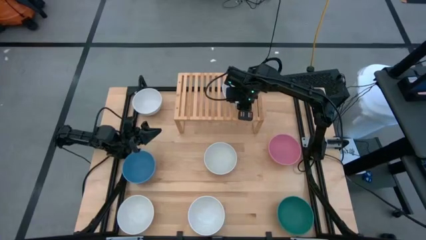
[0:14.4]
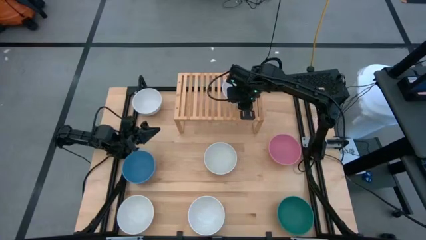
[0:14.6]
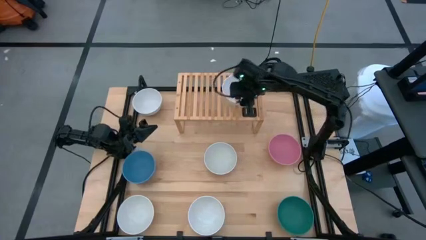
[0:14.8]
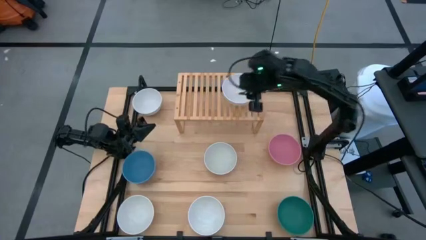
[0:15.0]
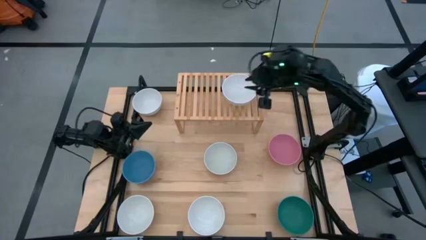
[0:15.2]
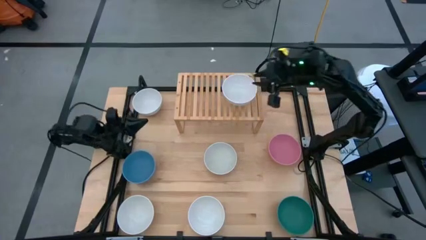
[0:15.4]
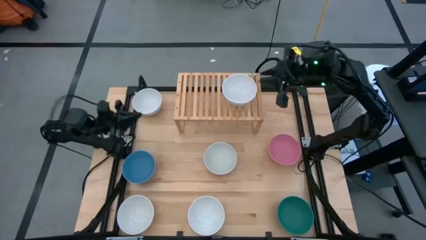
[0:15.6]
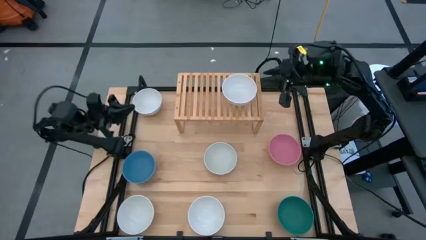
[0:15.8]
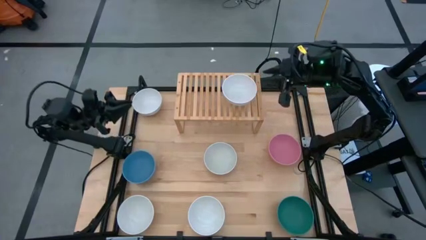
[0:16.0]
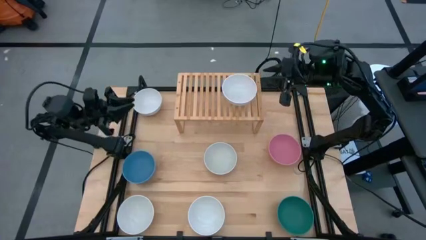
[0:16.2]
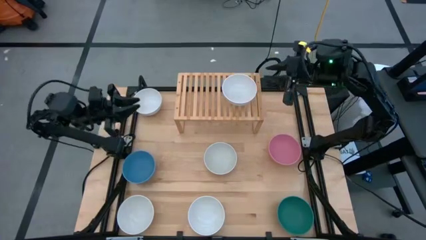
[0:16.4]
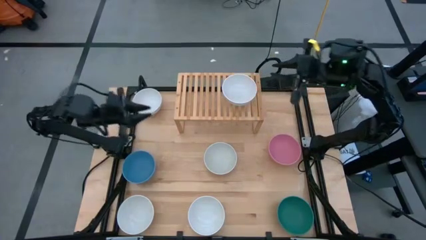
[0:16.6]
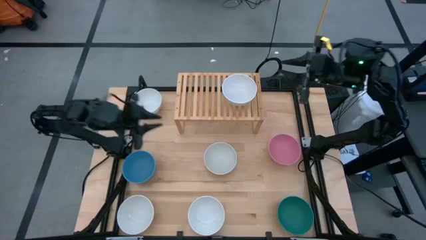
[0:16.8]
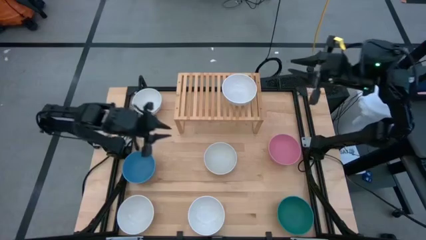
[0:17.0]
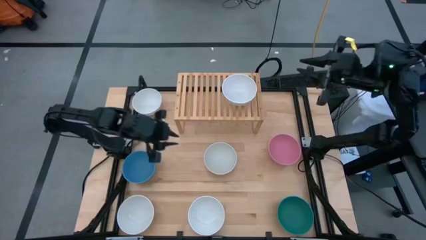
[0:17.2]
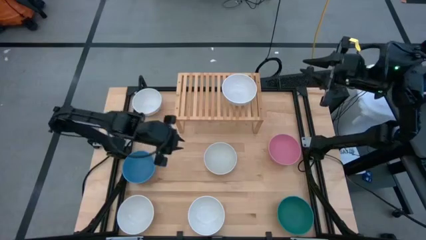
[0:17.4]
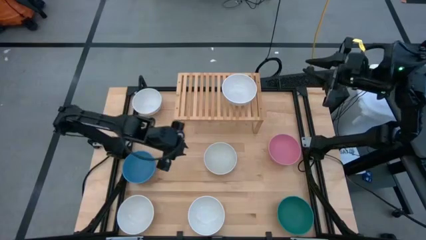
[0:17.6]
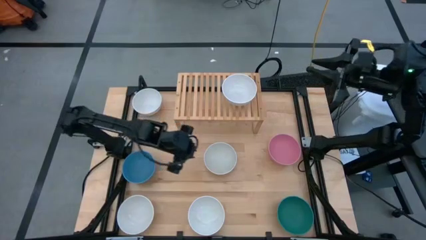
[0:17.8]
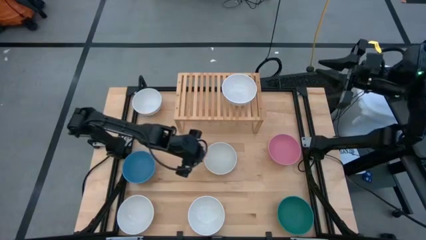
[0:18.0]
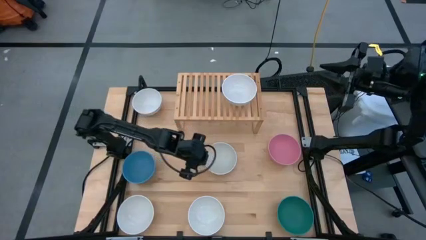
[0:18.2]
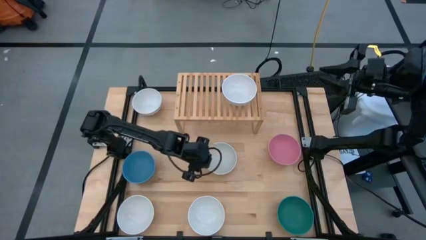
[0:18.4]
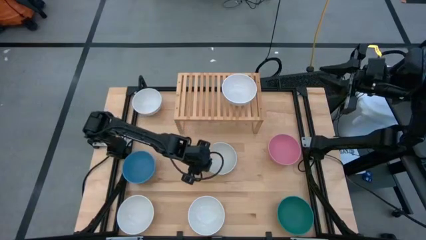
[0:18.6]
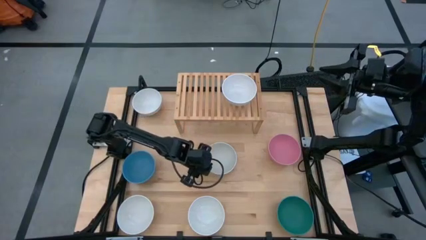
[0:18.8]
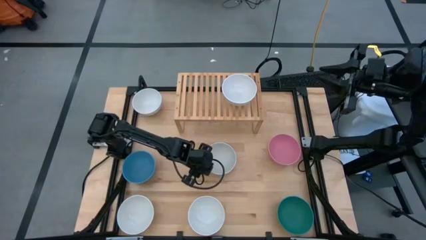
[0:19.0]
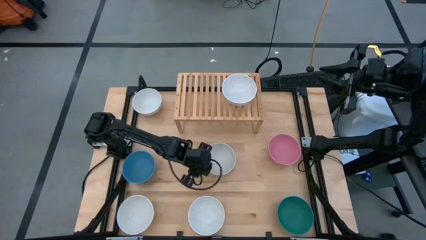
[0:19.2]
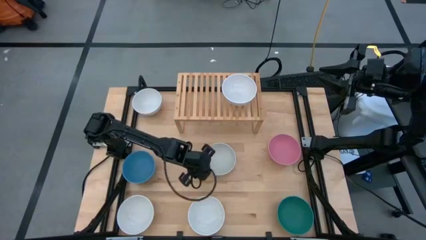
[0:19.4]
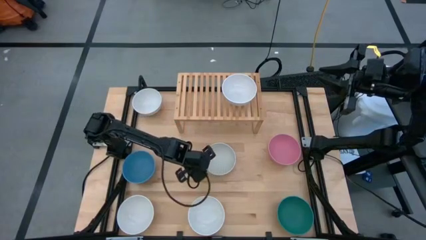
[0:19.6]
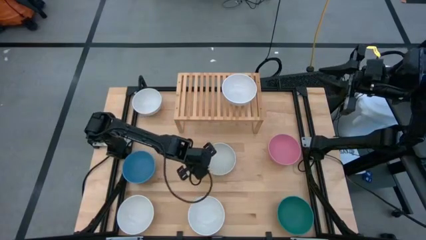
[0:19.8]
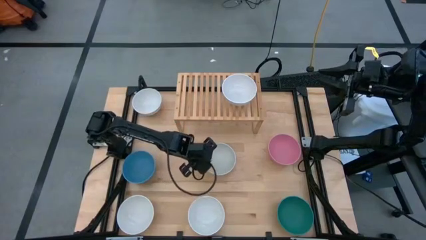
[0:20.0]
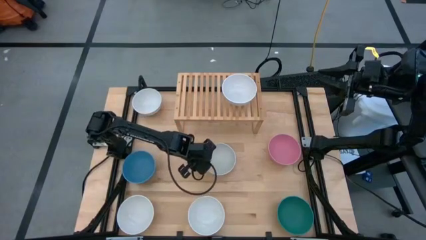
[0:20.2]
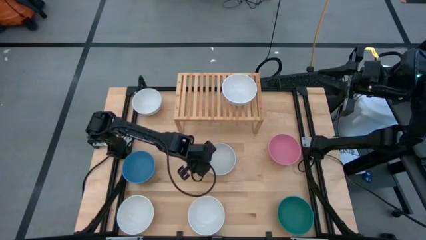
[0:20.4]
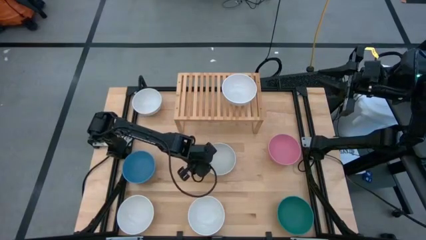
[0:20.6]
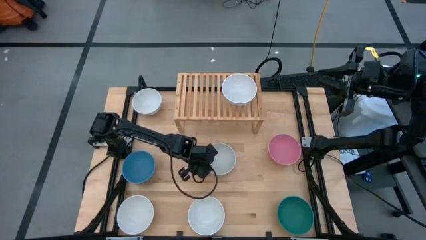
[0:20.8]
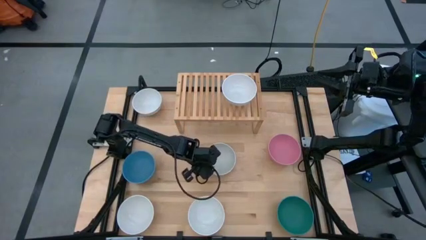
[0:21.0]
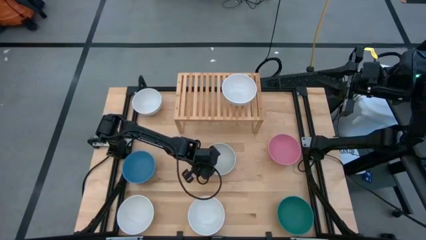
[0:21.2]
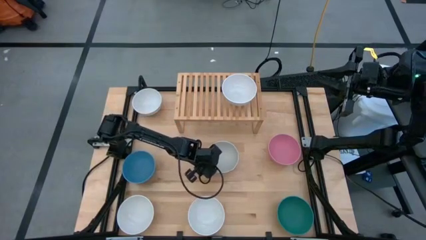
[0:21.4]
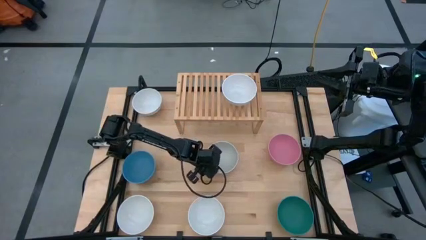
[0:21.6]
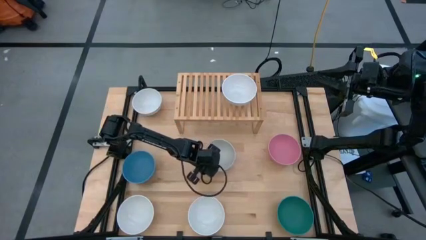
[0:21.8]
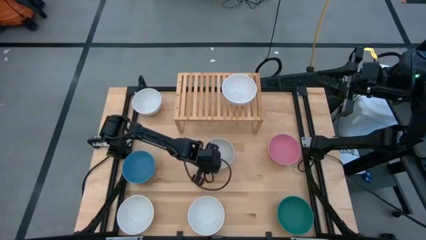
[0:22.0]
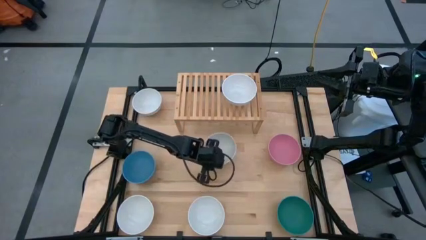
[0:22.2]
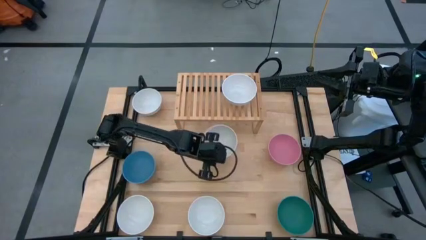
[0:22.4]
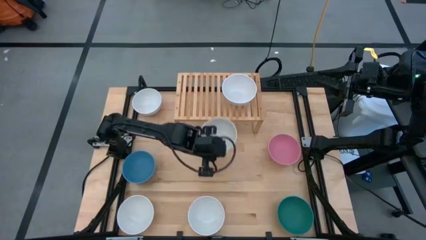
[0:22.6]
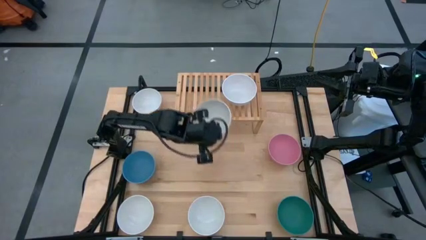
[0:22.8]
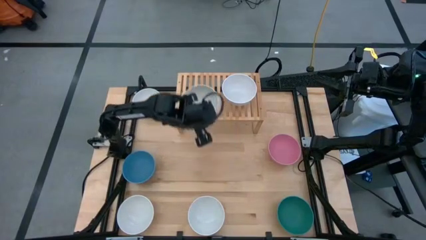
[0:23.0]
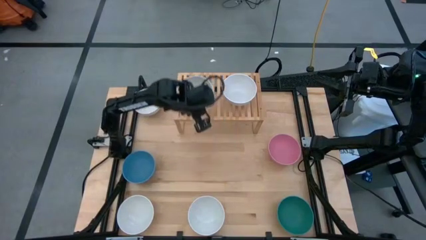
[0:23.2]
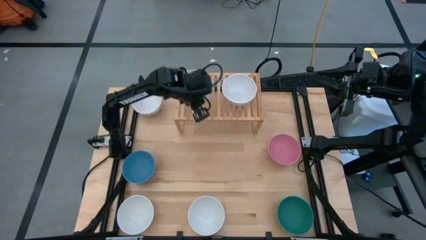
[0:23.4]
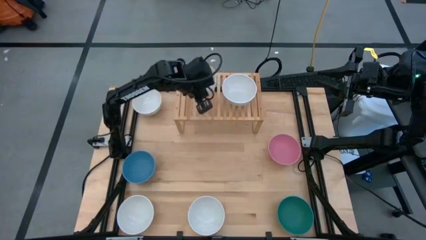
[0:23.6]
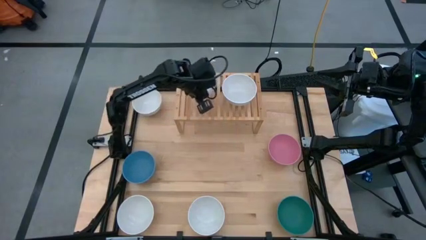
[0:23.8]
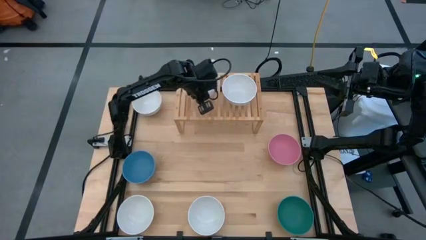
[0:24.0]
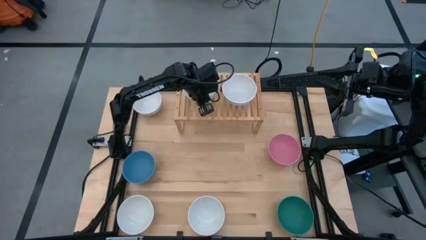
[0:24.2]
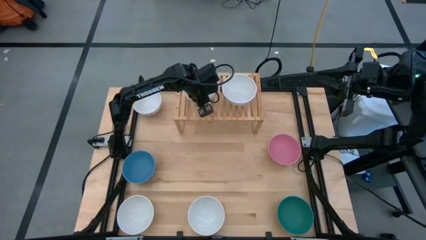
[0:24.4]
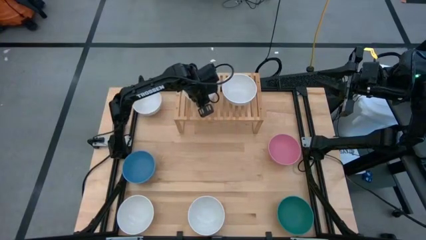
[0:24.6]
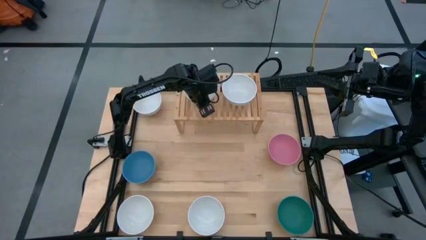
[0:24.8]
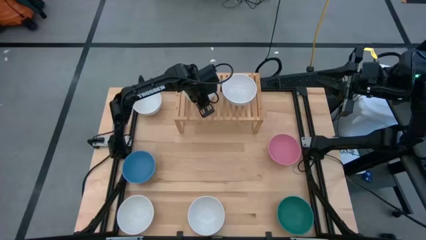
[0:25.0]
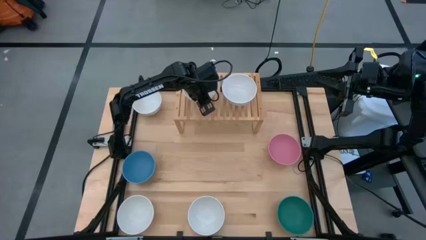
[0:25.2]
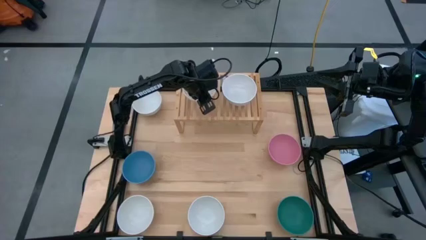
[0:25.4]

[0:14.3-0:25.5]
Task: Place and stack bowls onto a shelf
Put the white bowl on the shelf

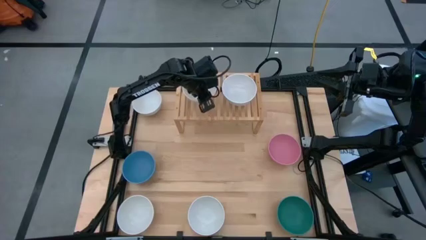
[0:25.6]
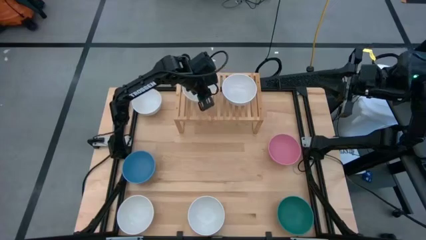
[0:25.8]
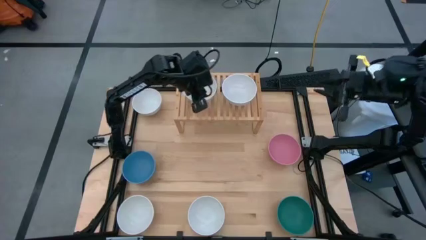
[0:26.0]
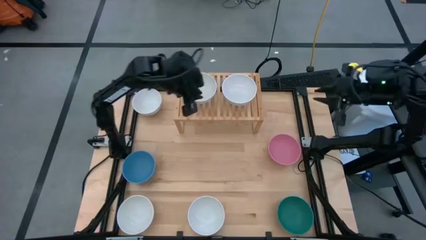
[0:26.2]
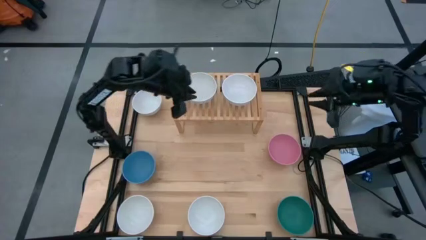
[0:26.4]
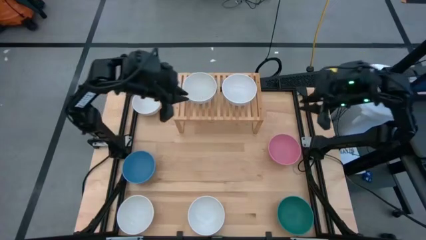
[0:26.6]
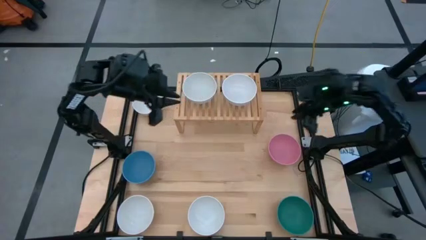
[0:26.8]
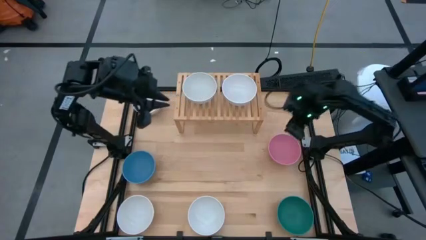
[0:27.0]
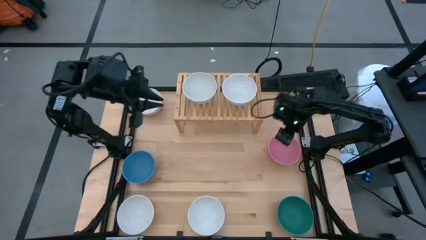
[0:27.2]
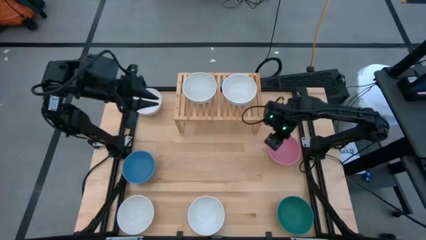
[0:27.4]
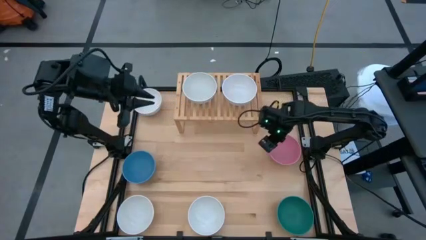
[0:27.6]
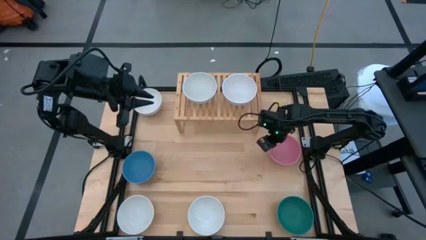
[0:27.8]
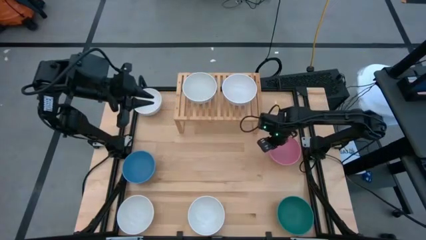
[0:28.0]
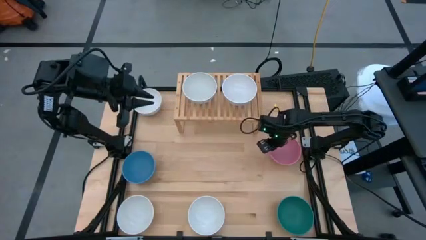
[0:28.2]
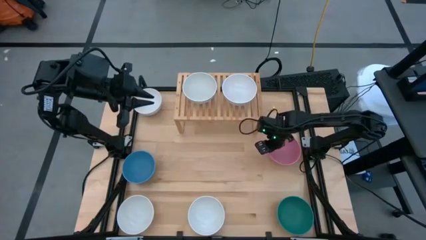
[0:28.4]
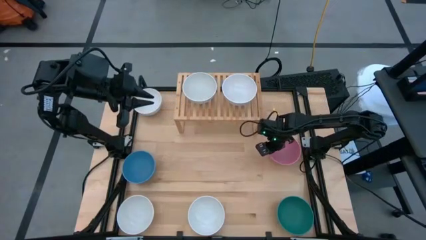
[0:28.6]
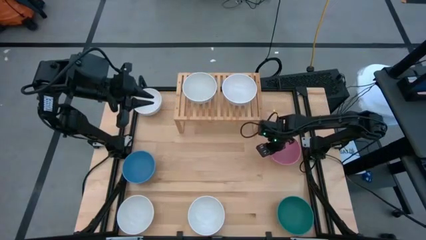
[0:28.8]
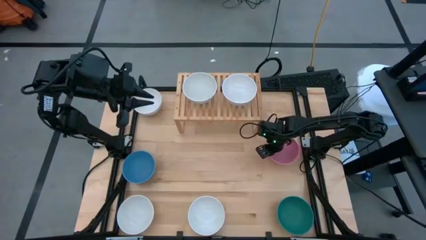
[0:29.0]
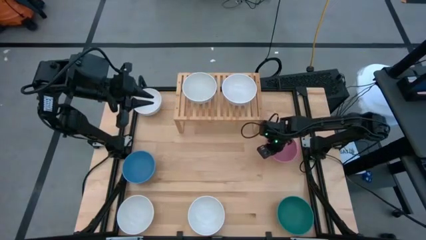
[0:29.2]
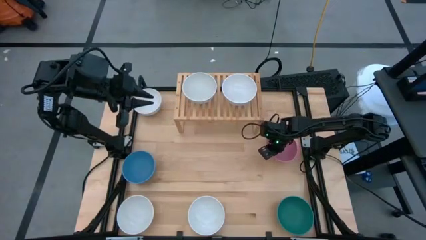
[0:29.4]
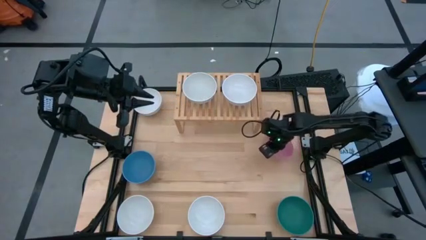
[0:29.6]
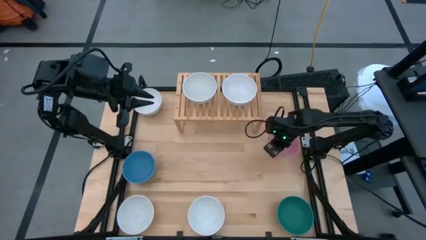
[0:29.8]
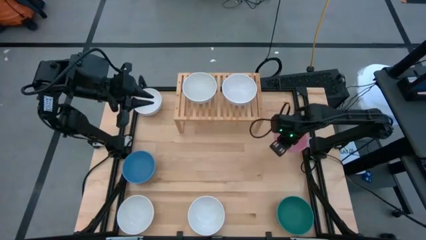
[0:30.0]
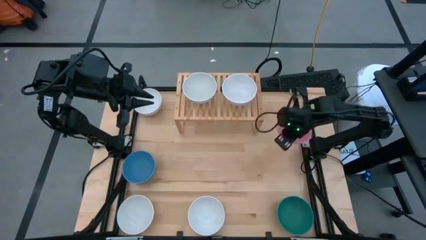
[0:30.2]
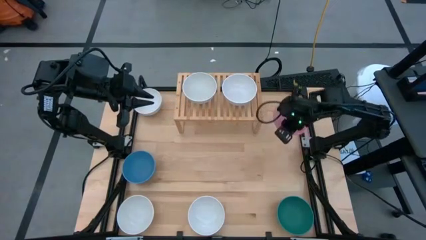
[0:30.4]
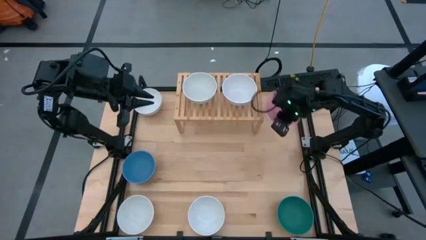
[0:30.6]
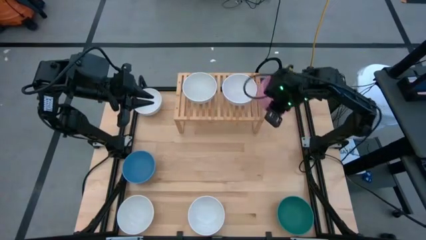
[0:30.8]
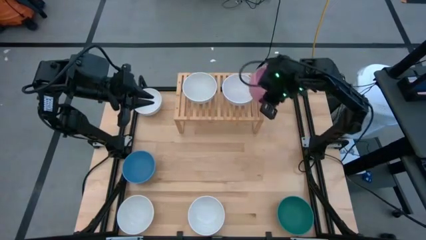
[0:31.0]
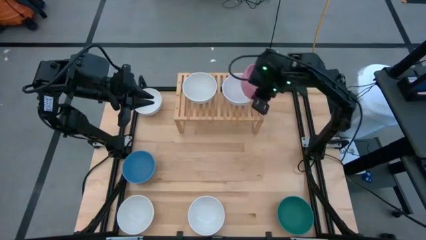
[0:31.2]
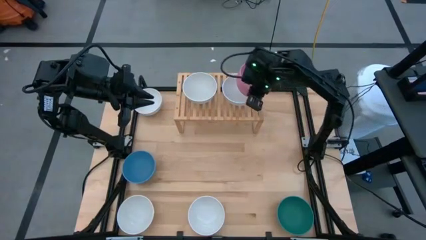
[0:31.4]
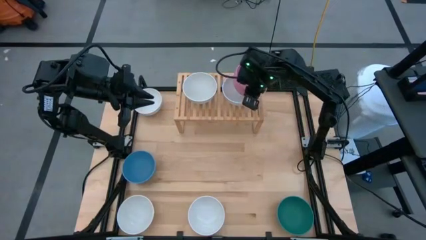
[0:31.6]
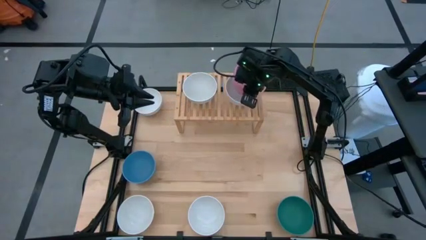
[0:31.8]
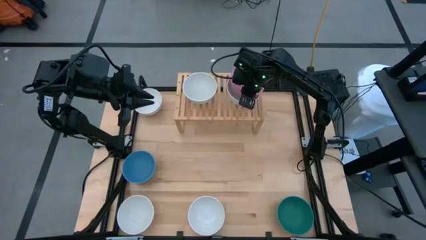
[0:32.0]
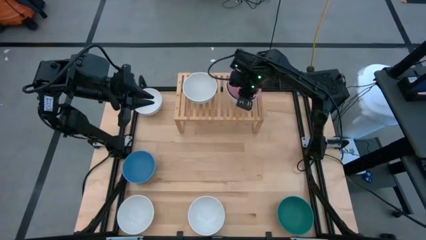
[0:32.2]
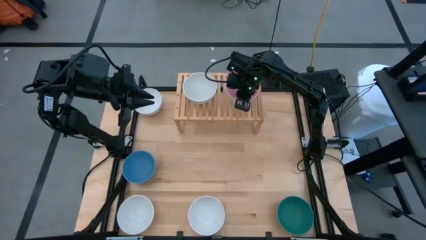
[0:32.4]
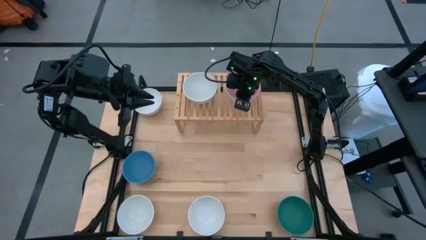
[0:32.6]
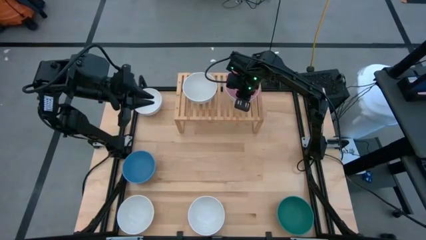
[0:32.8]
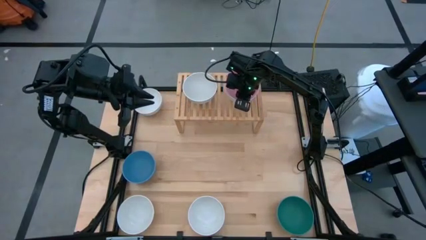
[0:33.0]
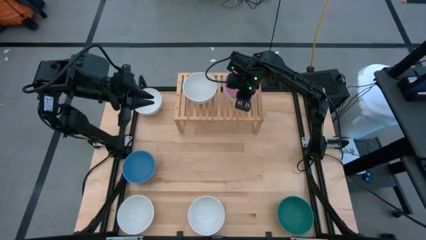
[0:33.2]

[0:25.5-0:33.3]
Stack the pink bowl on top of the white bowl on the shelf
